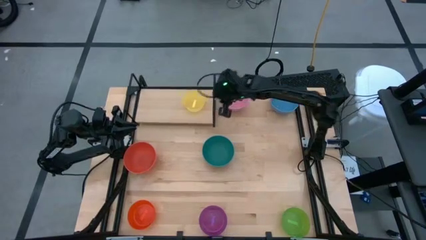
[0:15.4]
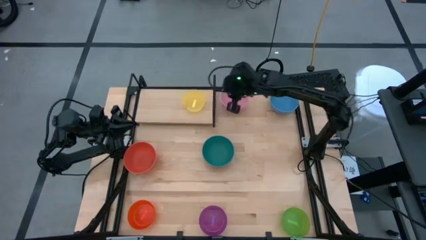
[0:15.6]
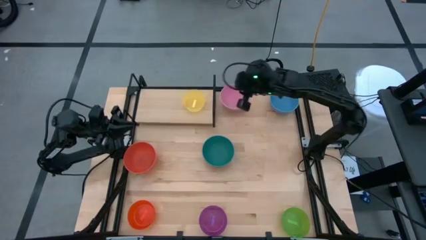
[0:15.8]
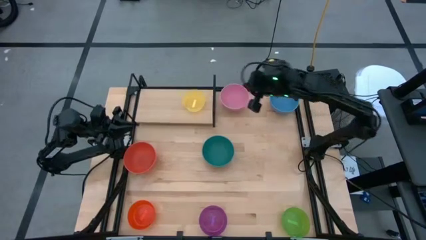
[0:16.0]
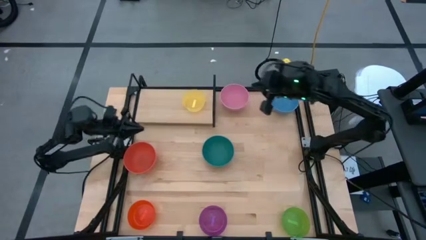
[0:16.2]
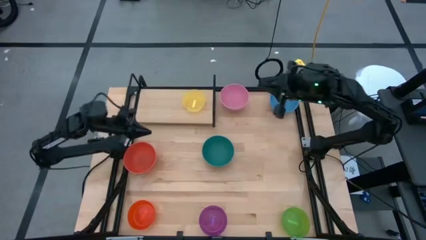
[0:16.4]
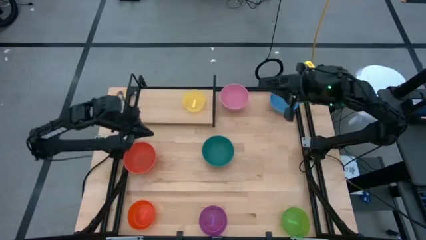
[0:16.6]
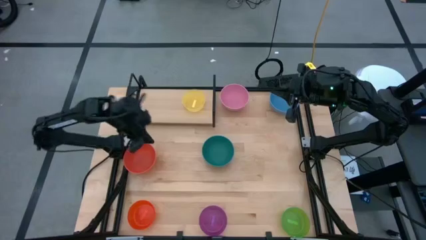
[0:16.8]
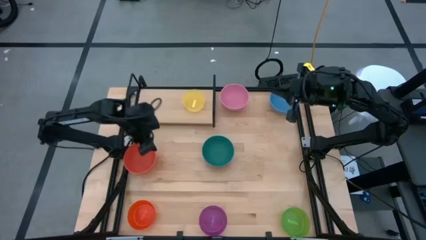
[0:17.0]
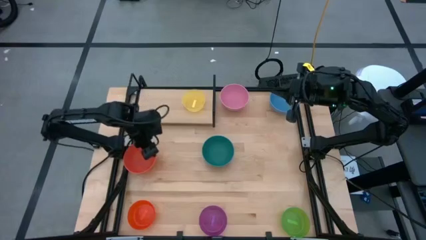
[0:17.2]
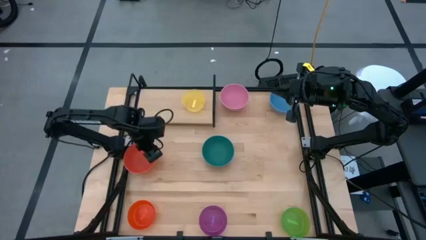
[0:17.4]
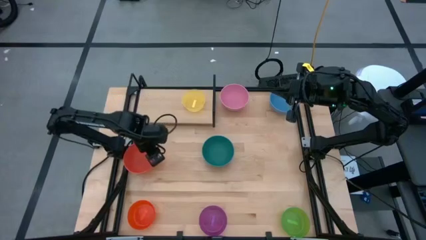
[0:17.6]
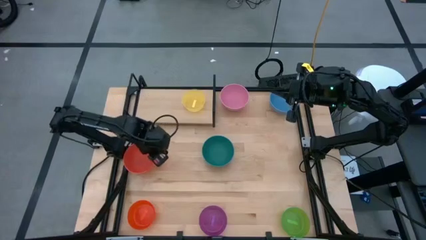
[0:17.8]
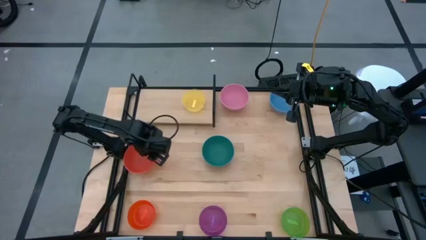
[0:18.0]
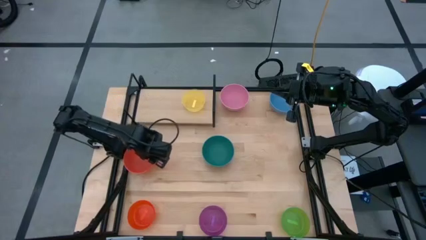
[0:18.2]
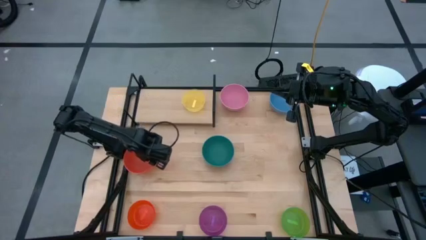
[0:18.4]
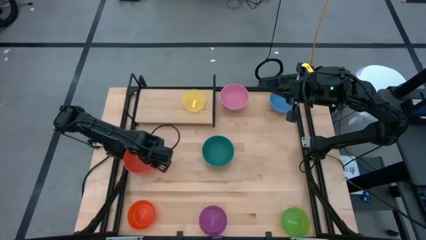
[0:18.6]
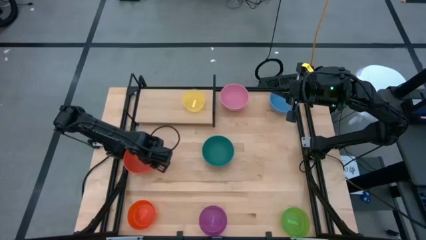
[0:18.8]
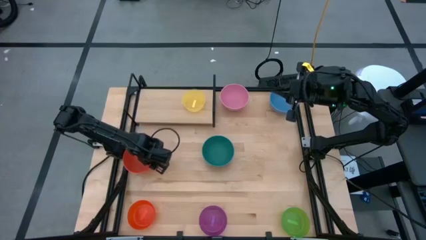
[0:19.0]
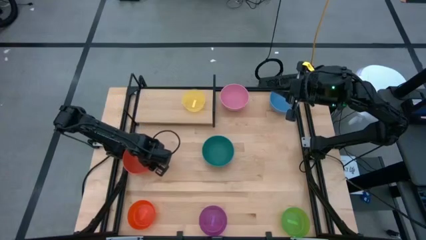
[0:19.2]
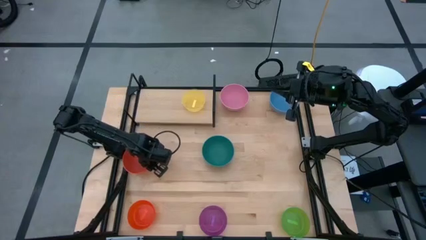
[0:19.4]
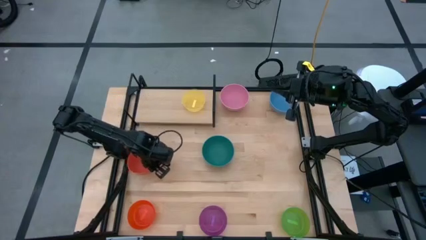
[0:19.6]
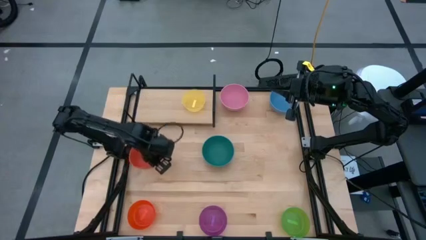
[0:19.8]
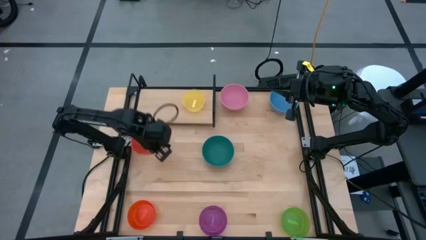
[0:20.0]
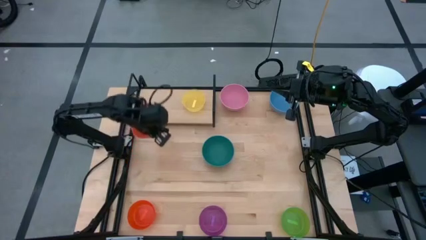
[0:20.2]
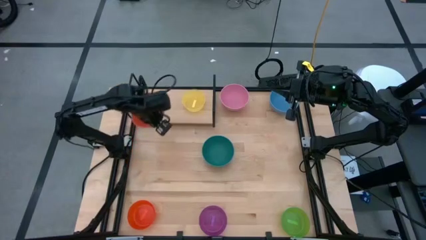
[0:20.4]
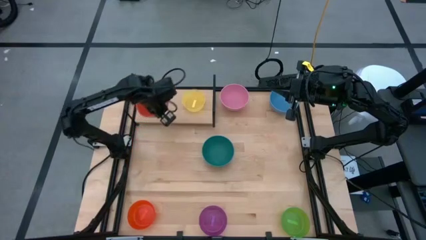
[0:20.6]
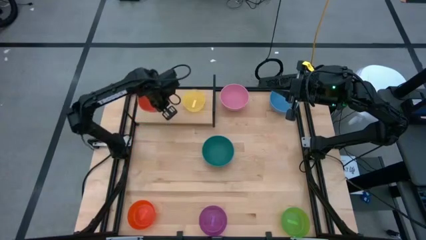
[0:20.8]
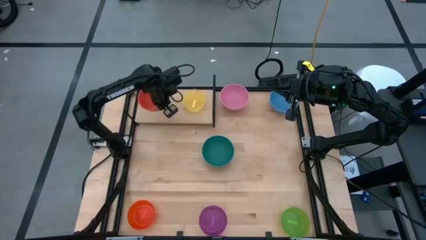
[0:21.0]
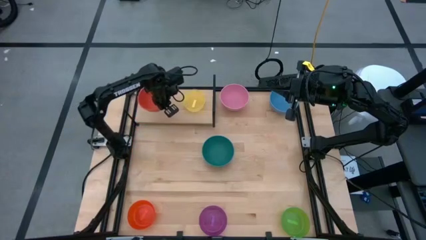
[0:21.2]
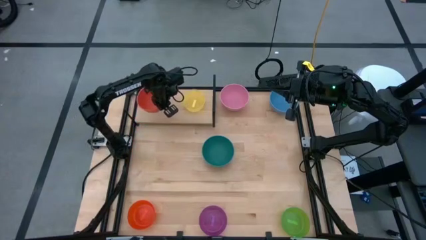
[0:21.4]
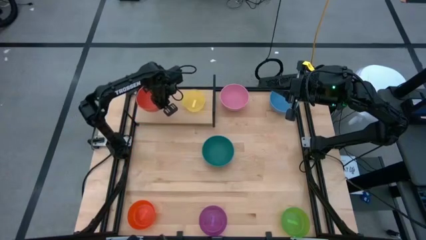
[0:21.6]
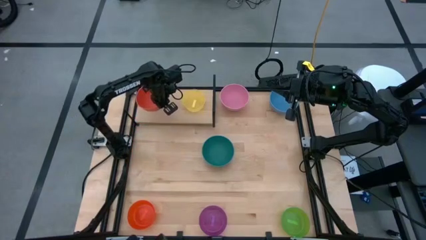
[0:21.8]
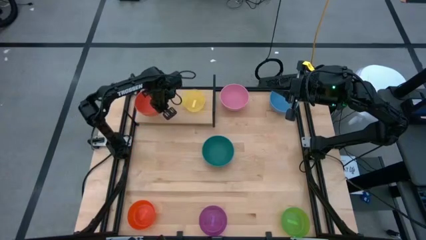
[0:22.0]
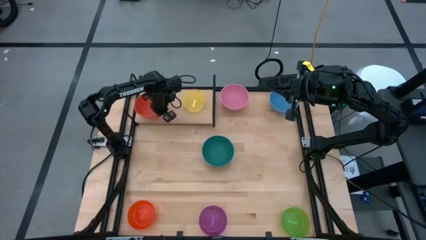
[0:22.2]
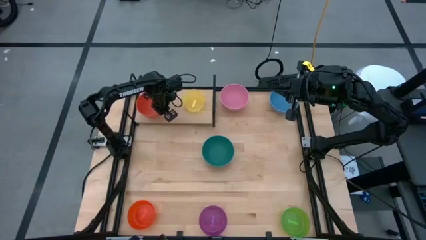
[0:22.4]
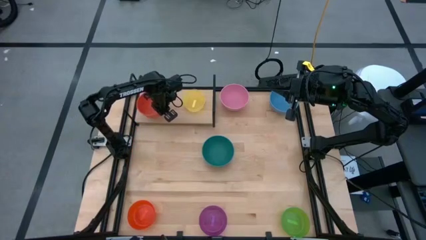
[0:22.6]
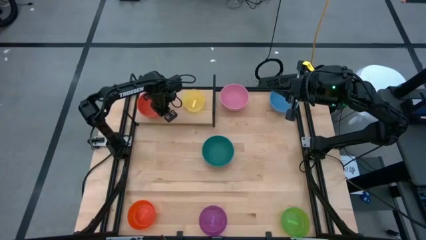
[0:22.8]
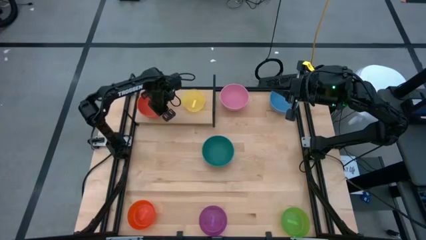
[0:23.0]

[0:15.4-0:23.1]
Task: Place and stack bowls onto a shelf
Put the top orange bowl on the shelf

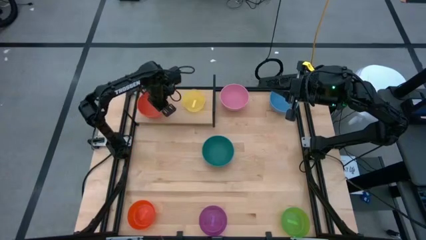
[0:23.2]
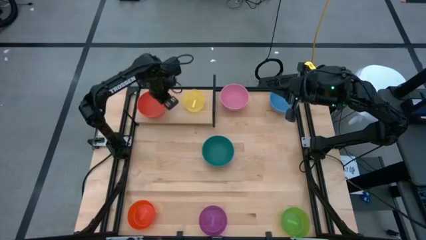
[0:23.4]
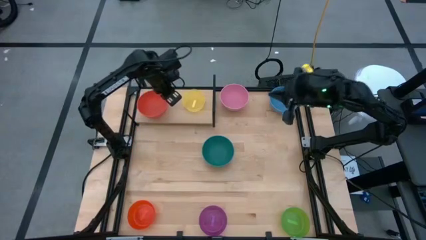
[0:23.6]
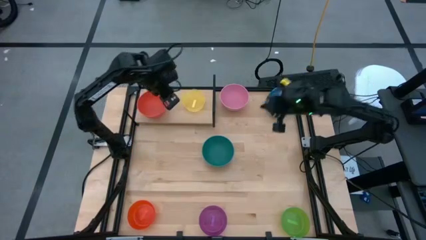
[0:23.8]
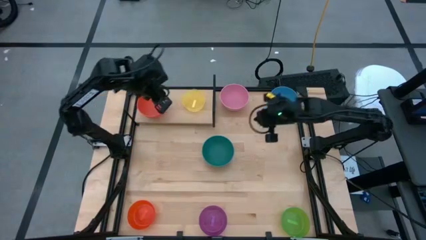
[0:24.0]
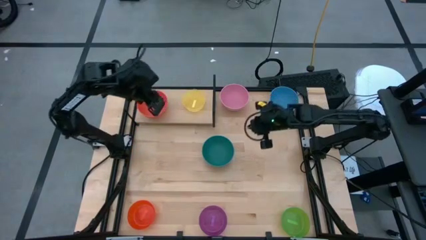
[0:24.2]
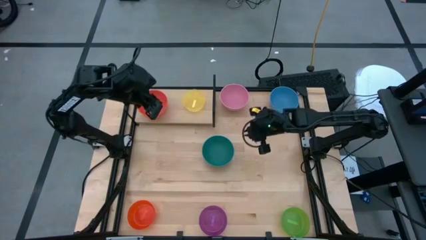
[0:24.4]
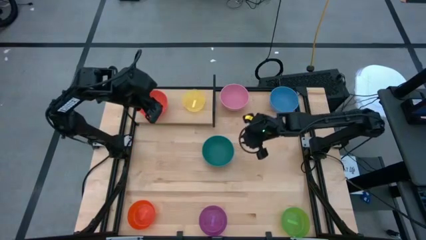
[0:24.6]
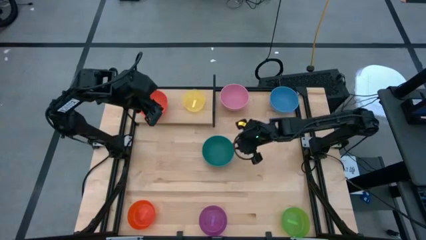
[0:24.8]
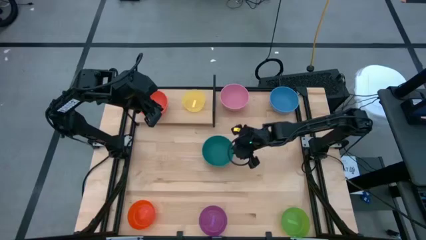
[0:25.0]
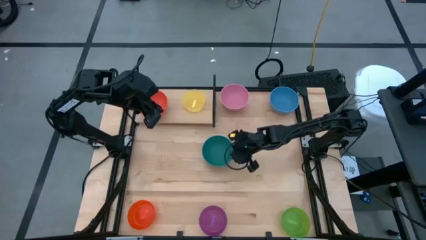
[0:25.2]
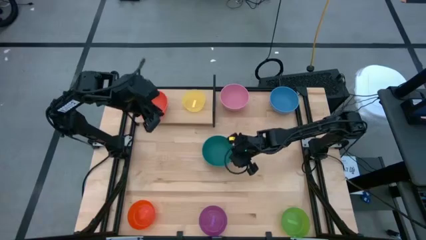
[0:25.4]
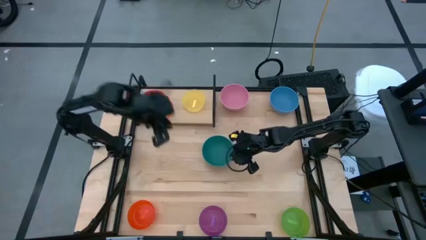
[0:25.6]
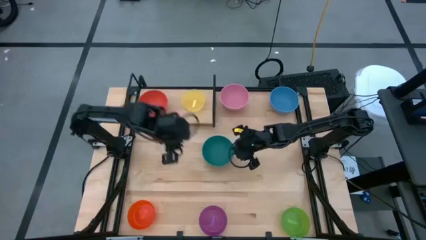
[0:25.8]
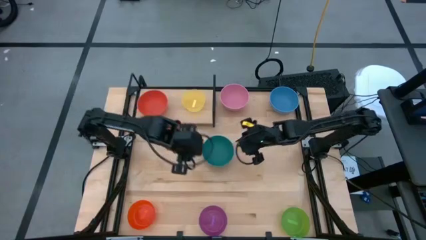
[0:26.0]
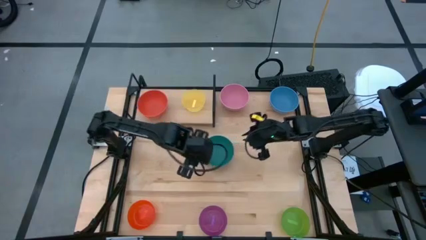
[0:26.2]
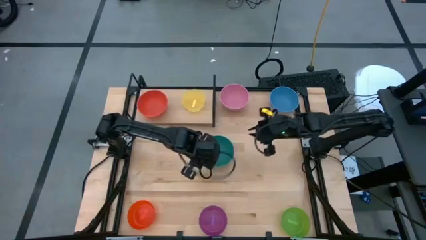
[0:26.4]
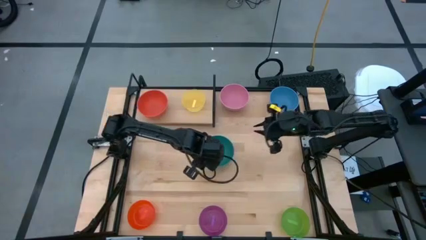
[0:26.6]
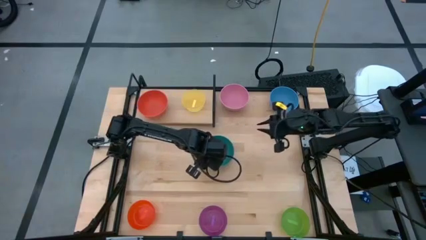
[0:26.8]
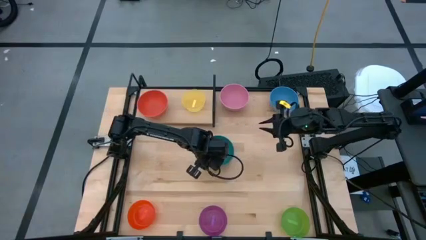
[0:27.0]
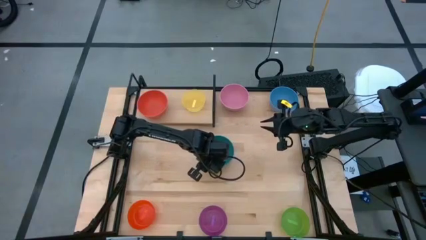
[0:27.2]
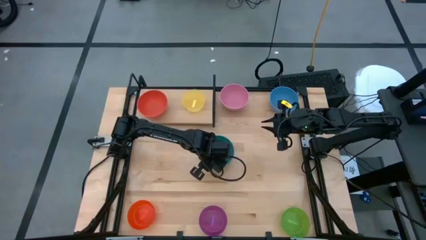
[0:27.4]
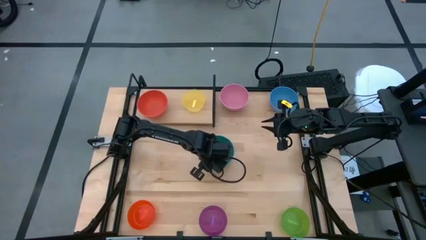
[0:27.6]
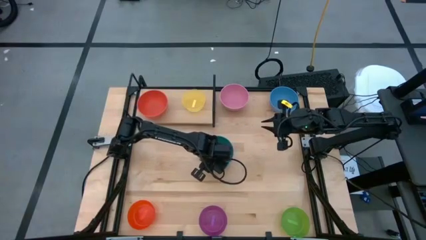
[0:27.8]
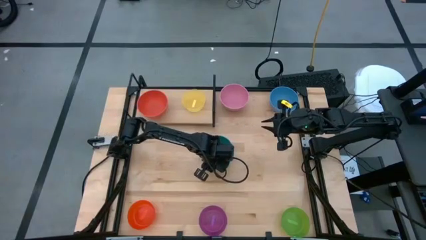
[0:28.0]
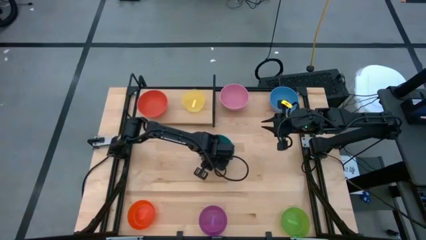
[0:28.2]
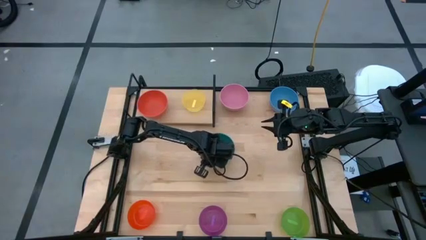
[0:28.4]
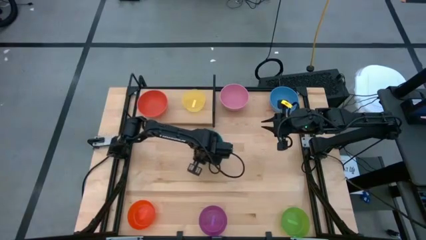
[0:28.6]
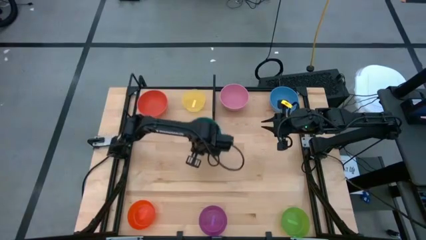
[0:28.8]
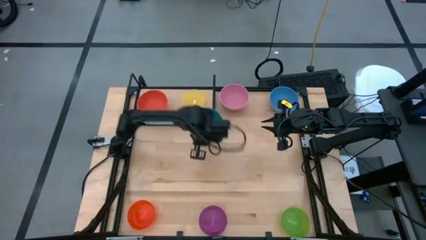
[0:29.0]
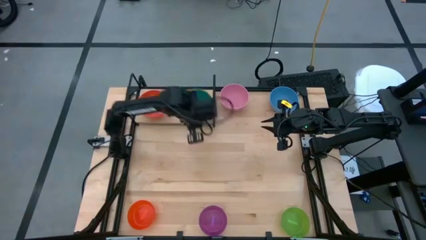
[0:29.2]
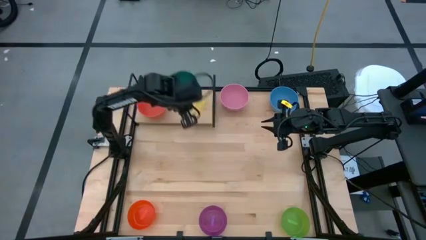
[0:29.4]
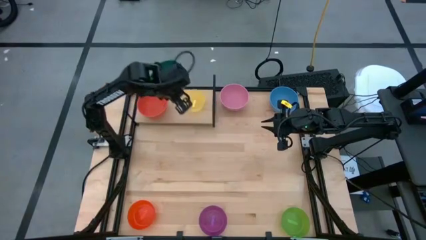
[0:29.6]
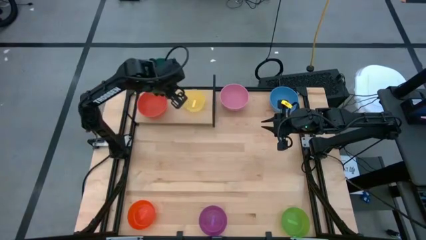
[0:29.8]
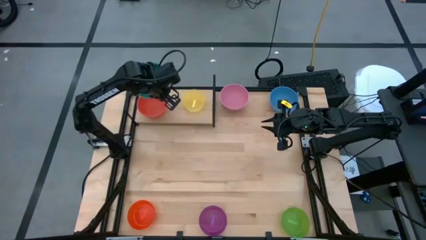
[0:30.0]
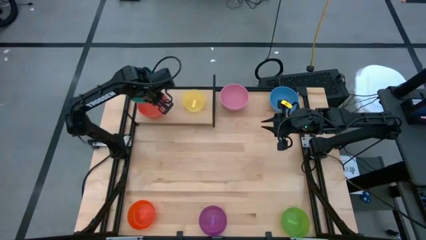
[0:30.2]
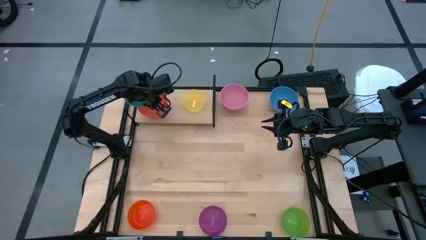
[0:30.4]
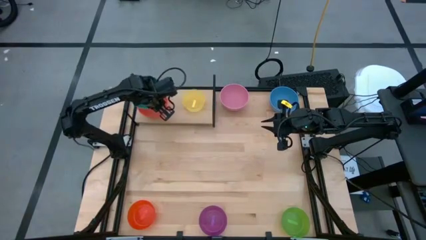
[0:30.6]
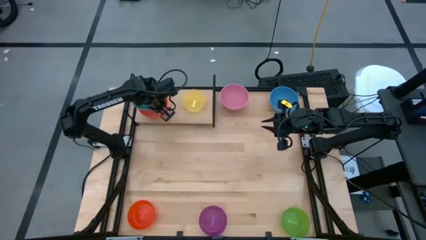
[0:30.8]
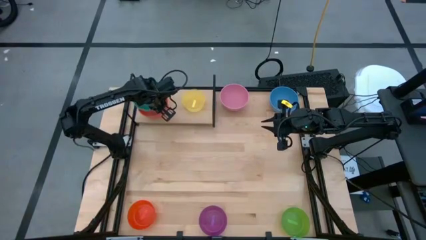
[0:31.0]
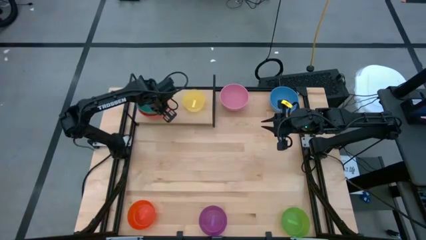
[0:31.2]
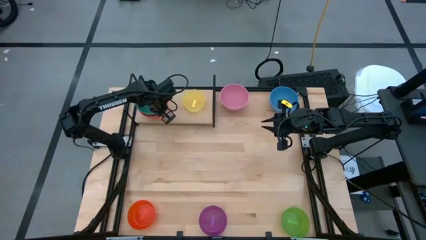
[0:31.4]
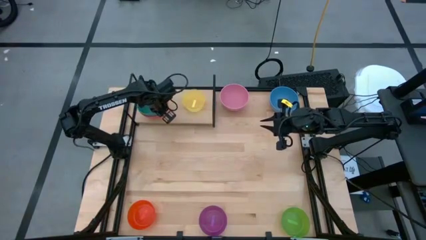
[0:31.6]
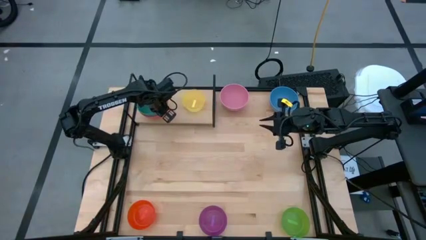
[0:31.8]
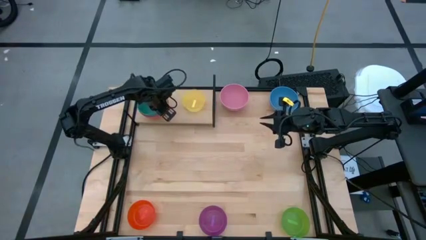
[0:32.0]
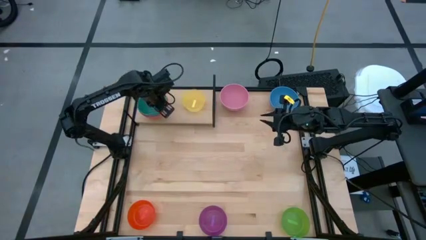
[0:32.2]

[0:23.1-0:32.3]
Stack the dark green bowl on top of the orange bowl on the shelf
